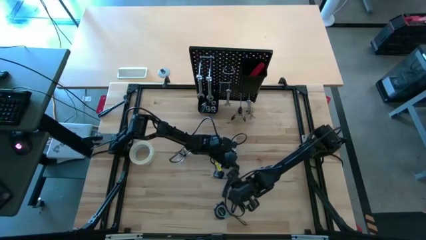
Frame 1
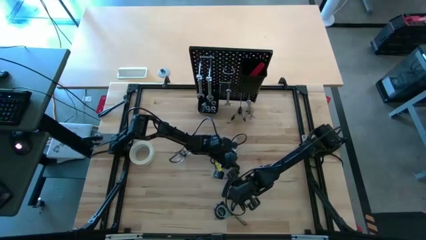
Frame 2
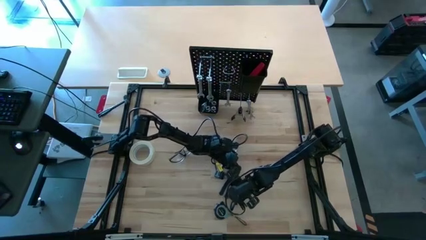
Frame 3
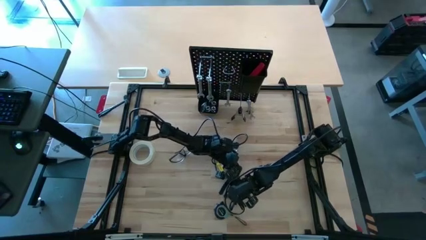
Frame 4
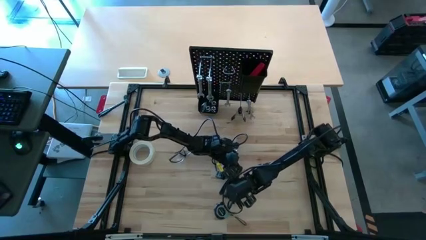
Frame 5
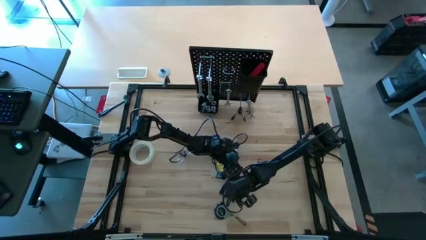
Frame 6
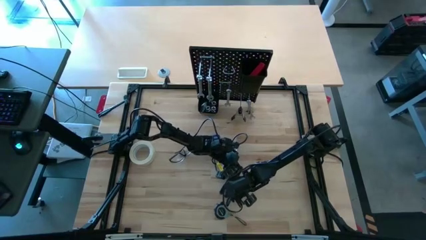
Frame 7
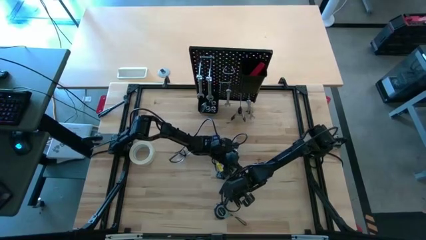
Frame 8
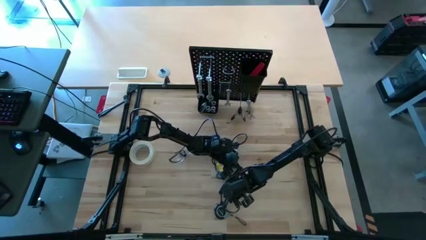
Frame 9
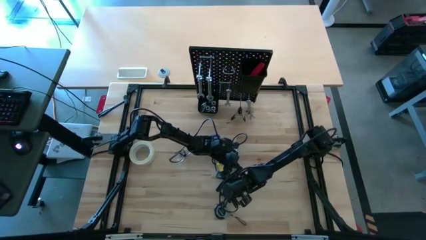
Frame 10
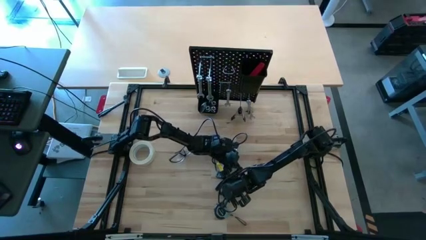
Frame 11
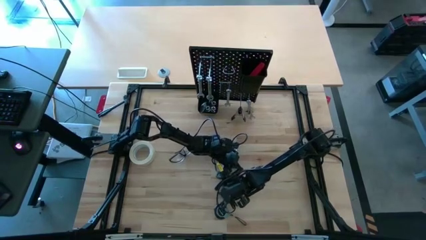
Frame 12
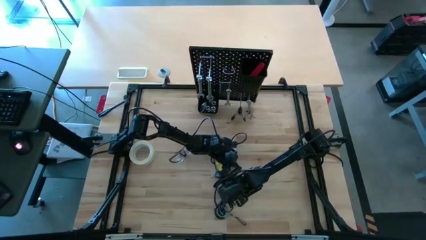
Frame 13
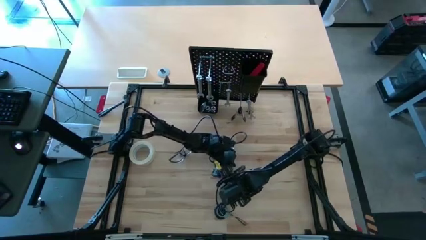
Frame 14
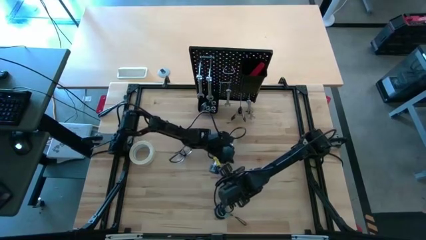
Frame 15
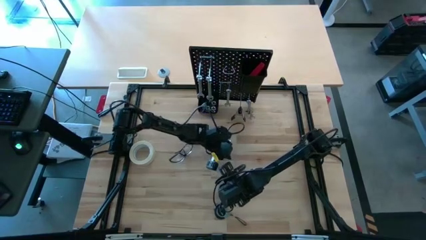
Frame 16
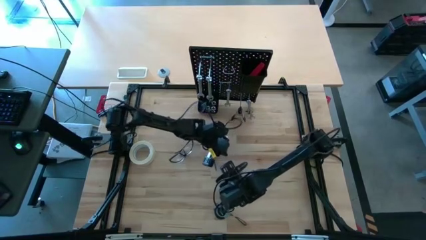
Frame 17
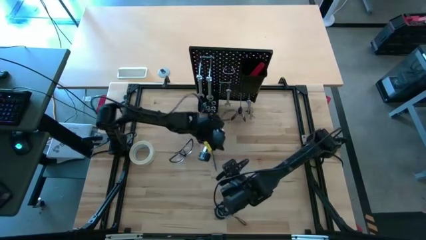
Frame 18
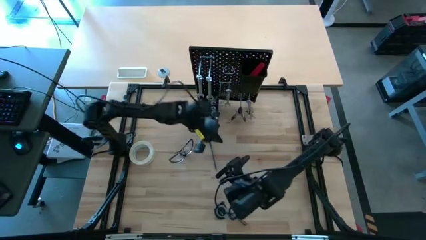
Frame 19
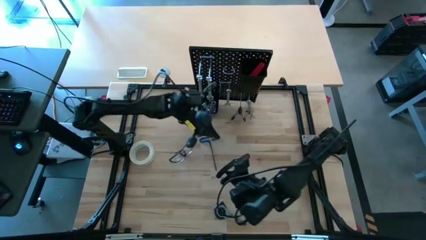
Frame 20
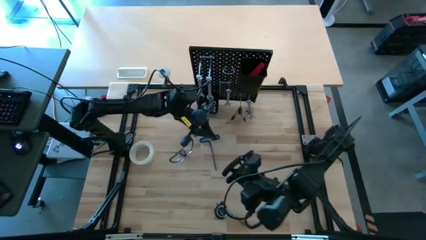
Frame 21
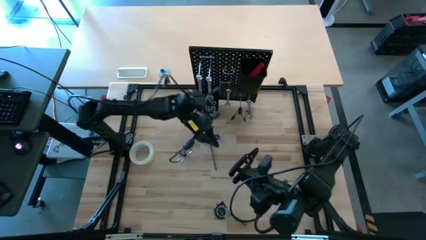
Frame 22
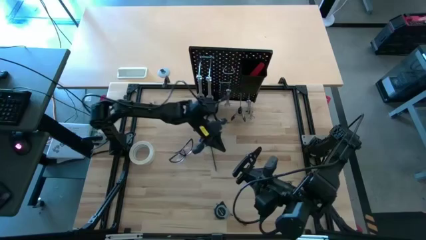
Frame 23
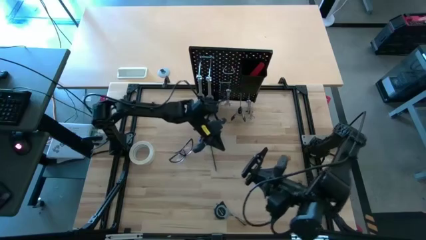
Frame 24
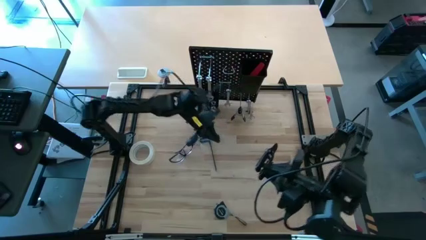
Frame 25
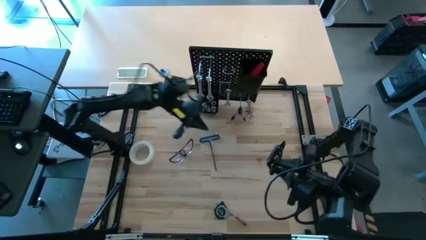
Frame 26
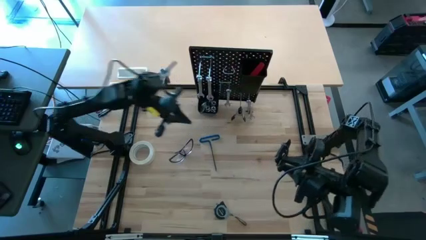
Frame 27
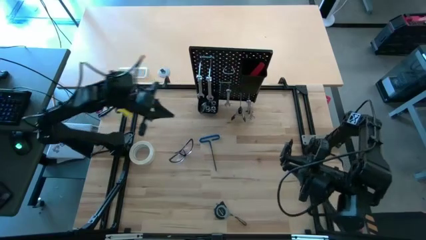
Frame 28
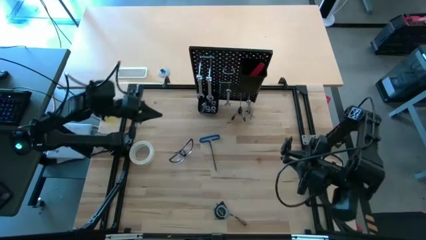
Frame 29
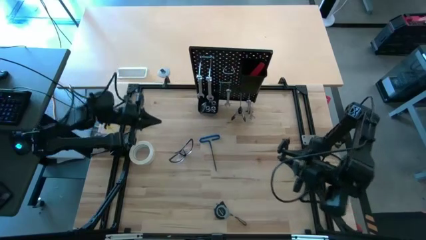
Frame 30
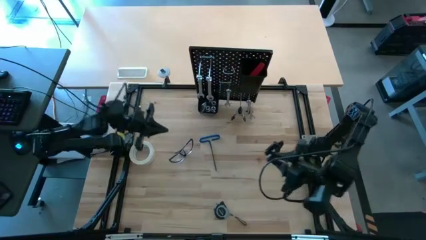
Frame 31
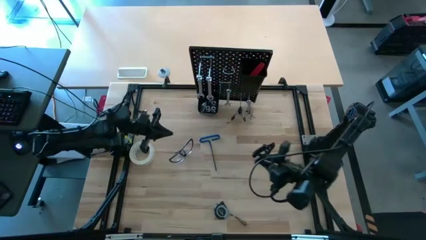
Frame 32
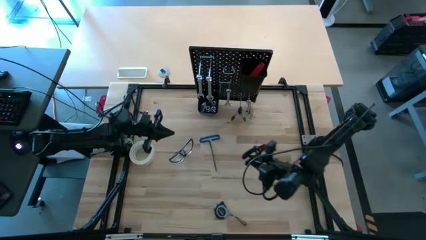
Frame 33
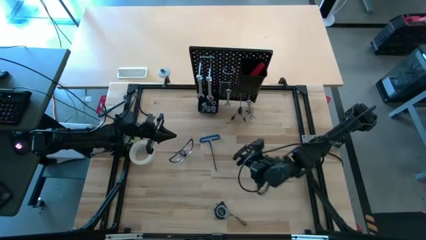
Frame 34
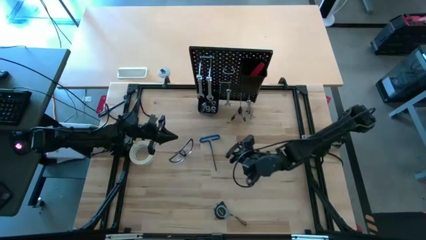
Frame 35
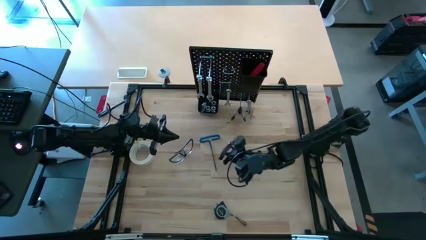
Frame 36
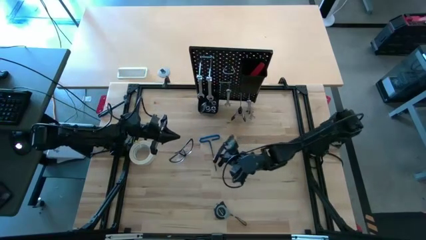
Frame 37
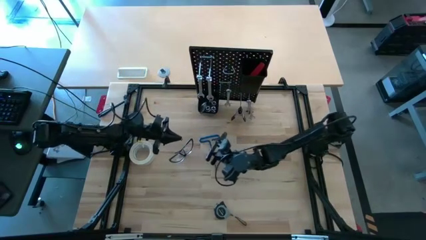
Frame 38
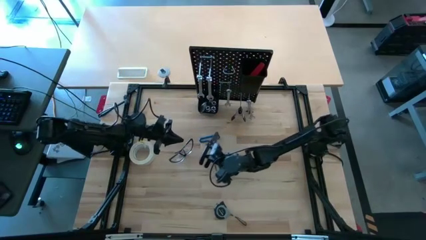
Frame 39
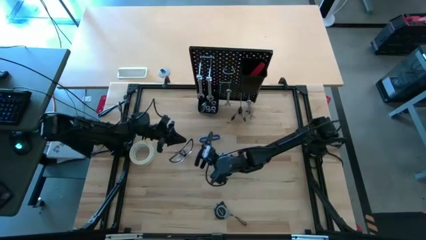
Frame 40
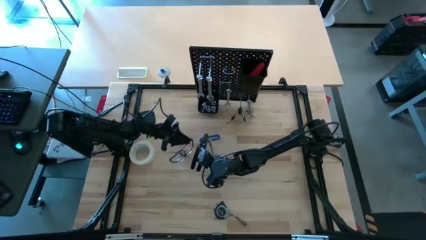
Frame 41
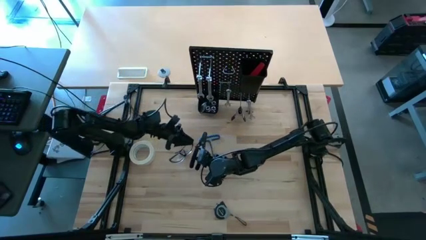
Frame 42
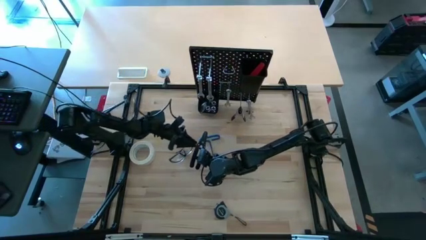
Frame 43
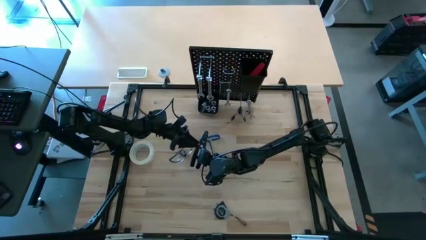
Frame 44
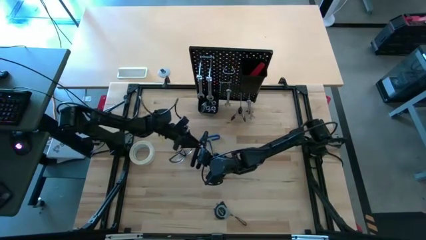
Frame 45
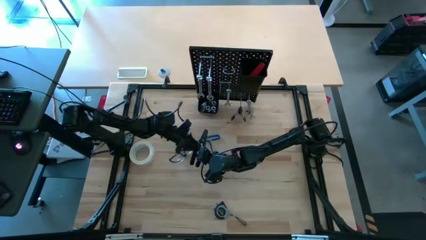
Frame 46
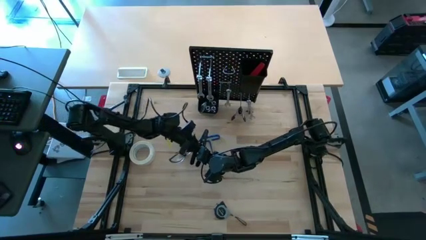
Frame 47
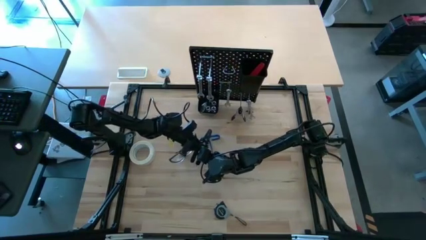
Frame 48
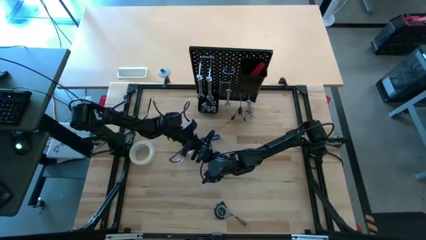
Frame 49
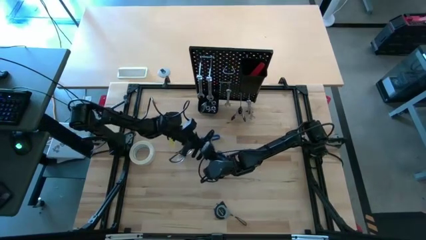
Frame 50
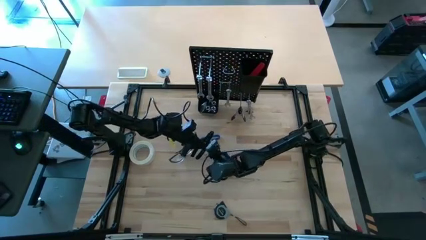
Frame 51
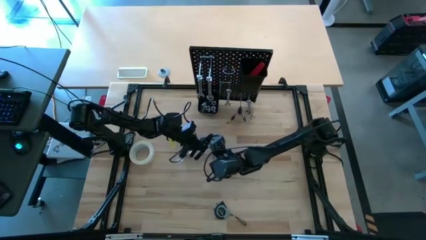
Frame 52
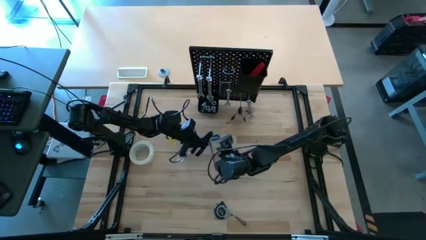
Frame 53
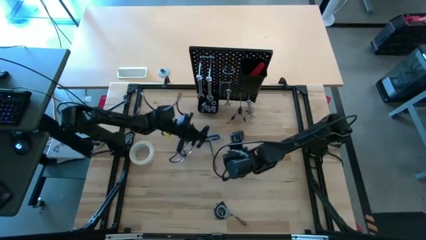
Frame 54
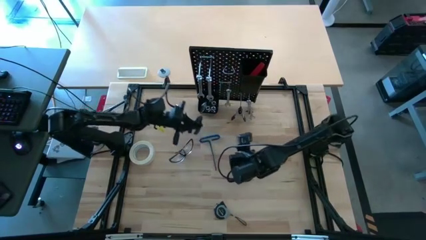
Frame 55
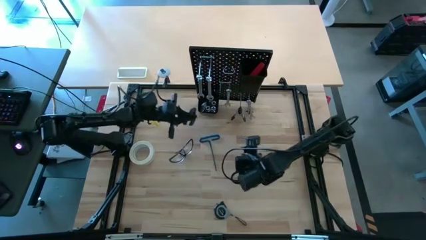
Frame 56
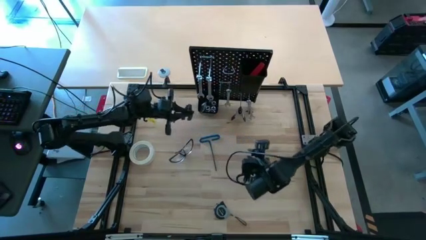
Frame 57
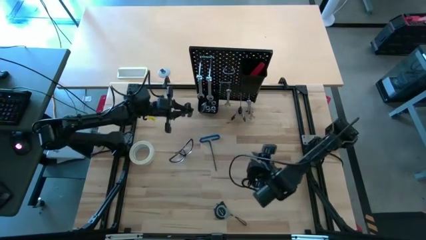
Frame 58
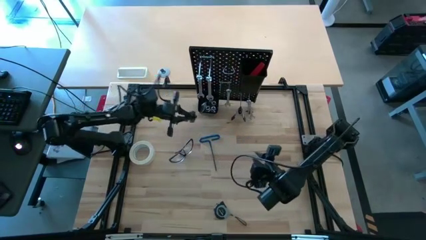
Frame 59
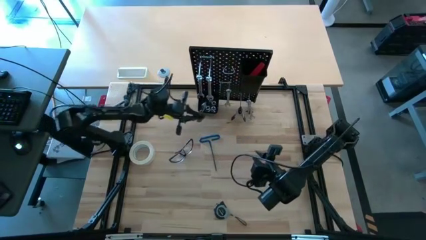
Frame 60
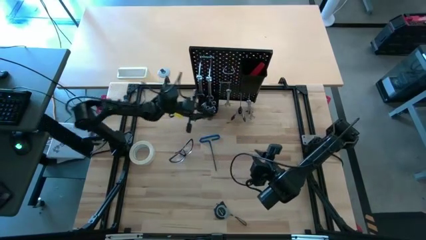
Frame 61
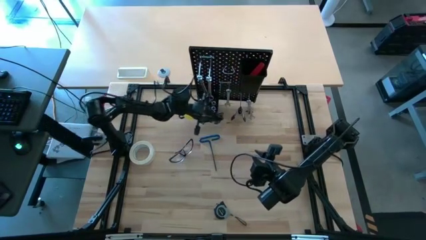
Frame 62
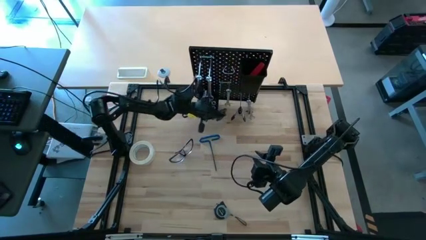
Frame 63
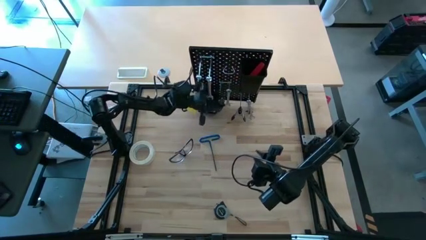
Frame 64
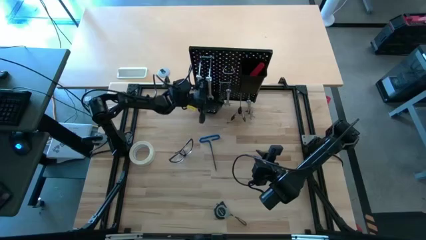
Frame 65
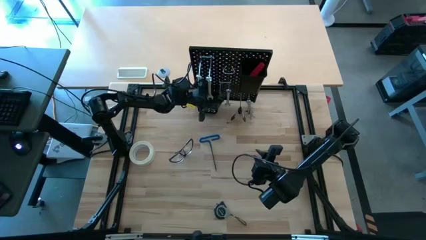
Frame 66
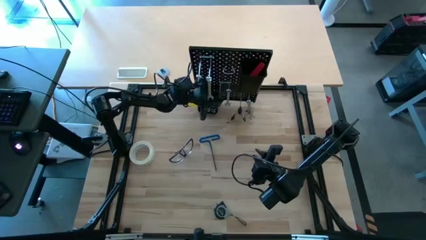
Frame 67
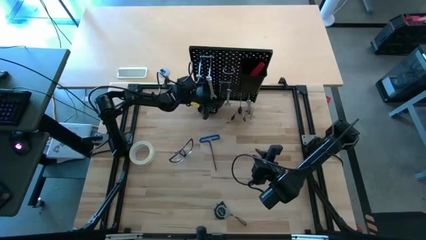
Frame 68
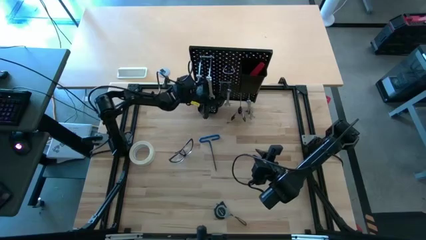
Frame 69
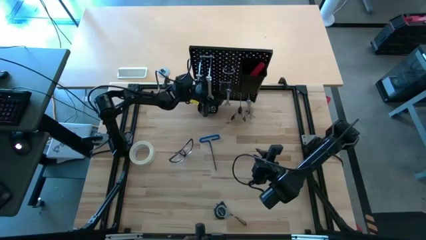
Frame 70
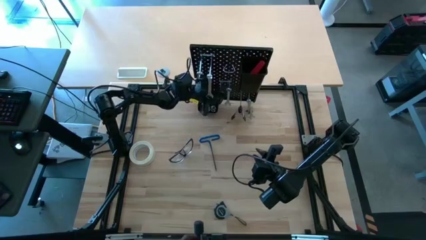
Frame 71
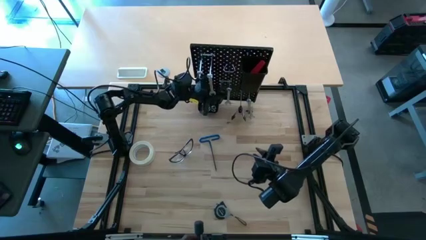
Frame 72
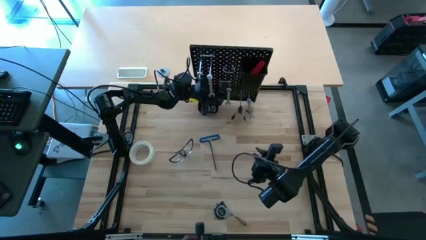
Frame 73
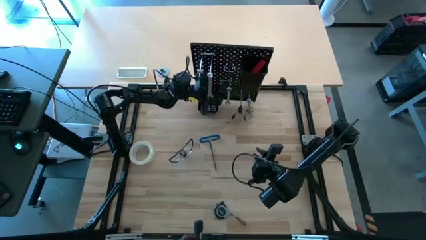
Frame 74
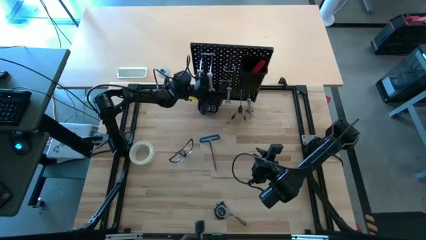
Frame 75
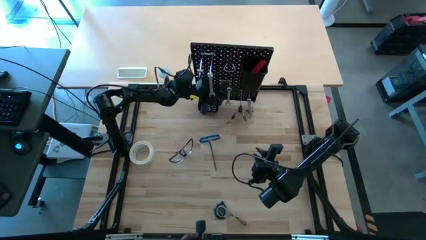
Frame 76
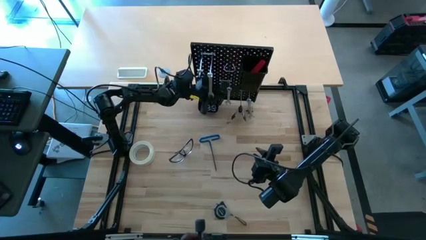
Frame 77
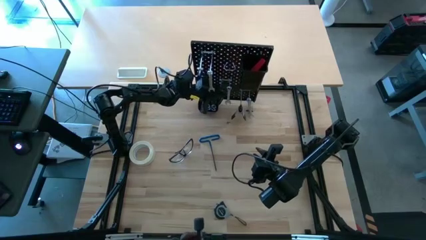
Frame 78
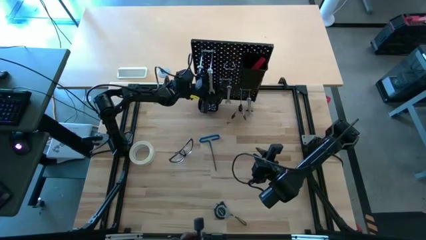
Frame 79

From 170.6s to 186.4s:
Task: Hang tools onto peg board
Hang the wire stripper onto the peg board

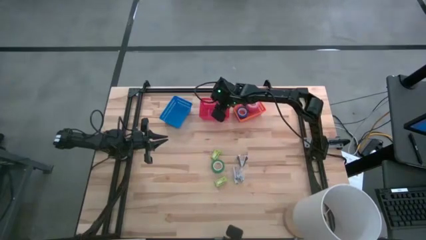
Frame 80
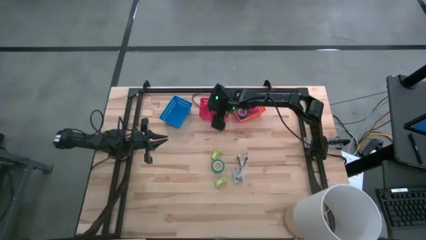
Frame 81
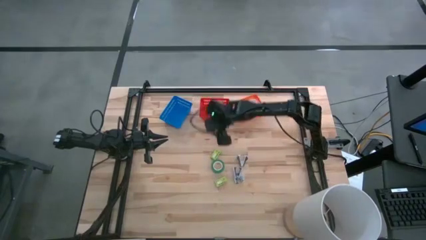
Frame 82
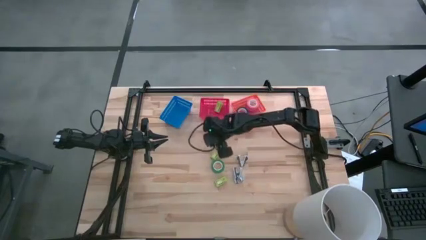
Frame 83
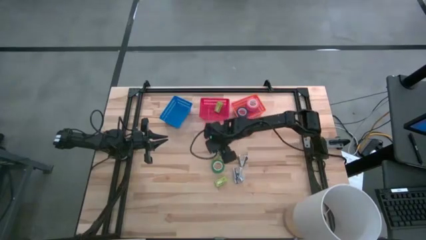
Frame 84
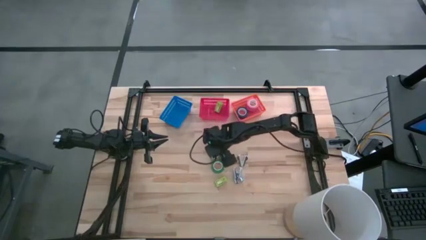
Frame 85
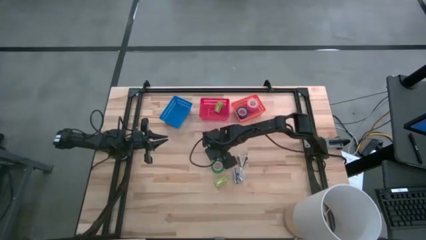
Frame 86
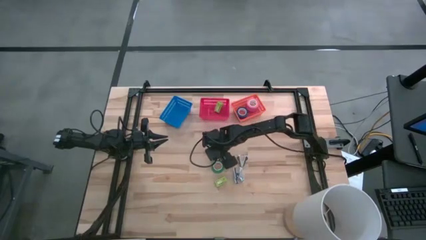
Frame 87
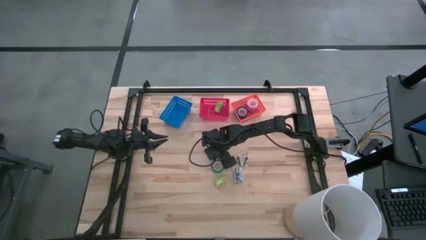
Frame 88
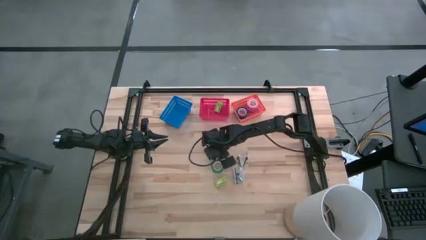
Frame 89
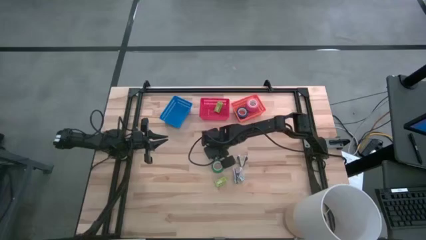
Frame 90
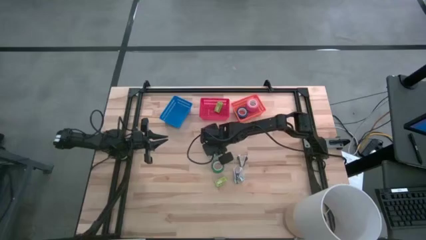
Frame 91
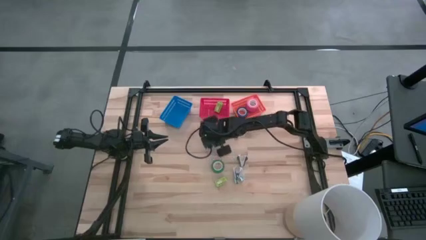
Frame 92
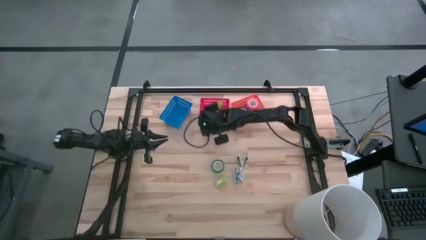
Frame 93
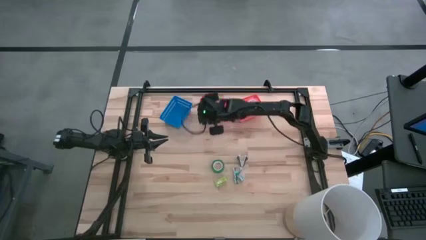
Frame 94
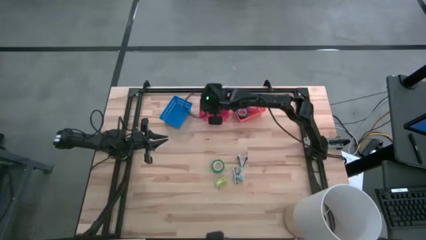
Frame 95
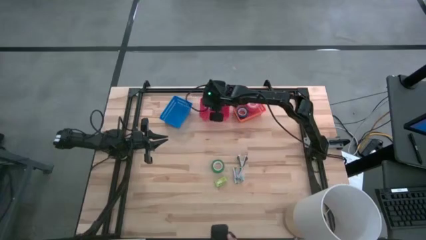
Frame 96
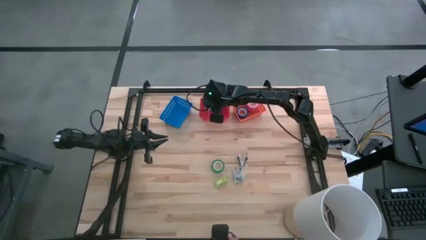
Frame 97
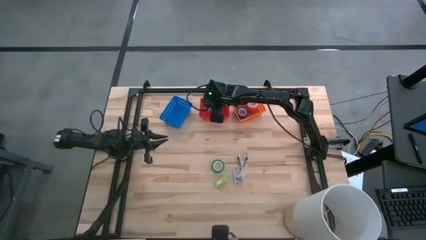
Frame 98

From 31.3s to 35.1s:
Task: Pick and place Stapler, Stapler remover, tape
Put the top staple box into the red bin
